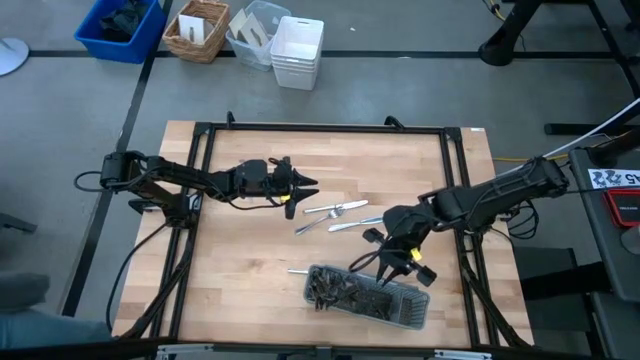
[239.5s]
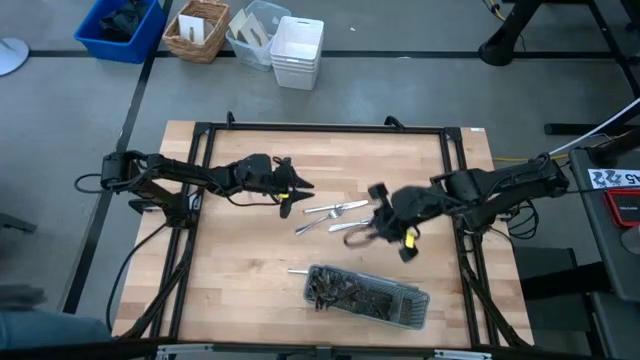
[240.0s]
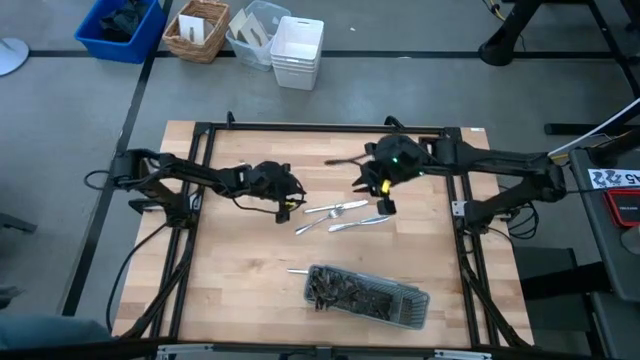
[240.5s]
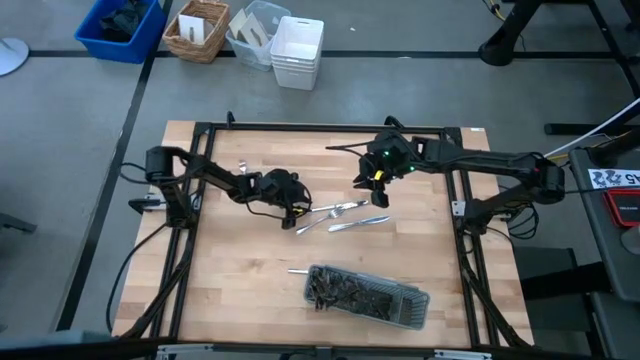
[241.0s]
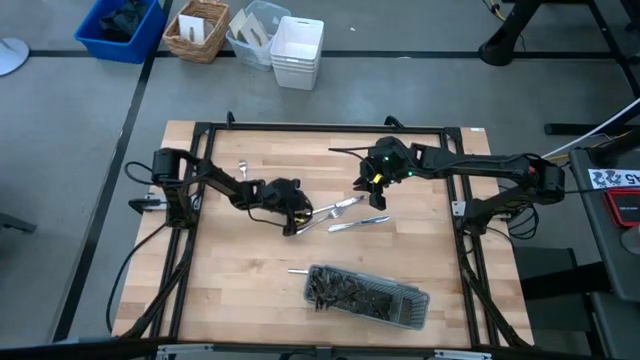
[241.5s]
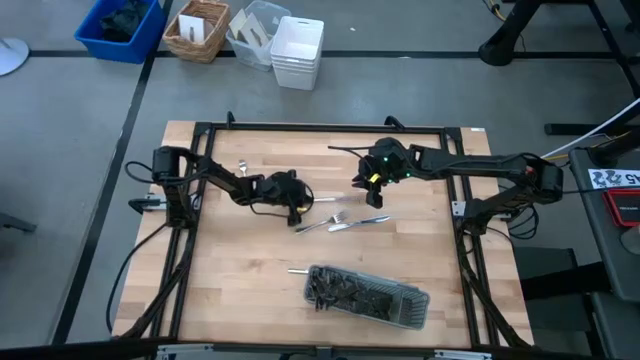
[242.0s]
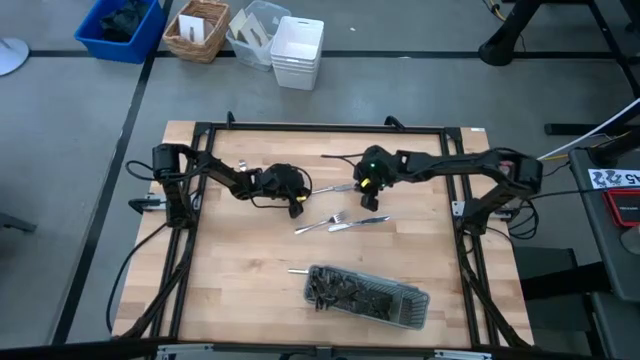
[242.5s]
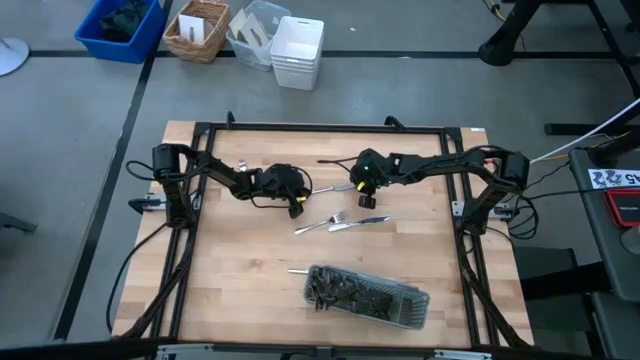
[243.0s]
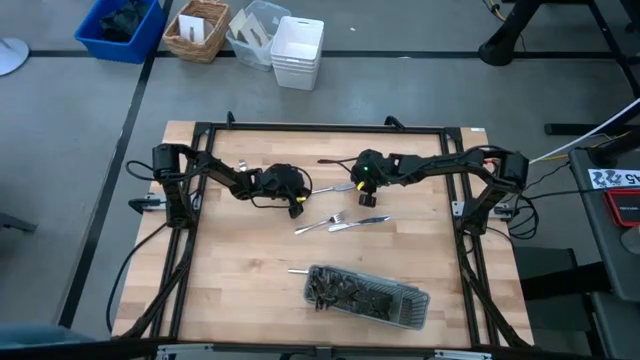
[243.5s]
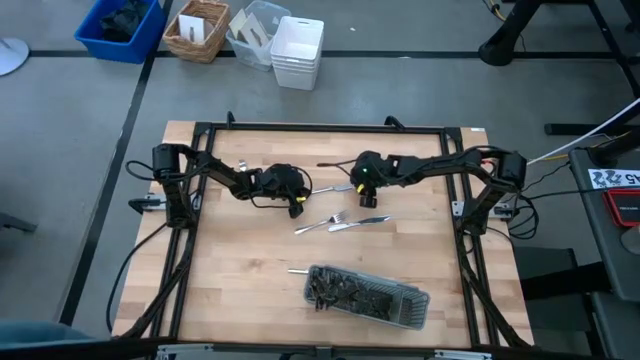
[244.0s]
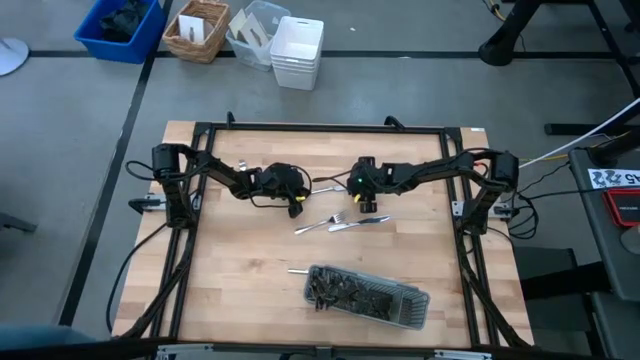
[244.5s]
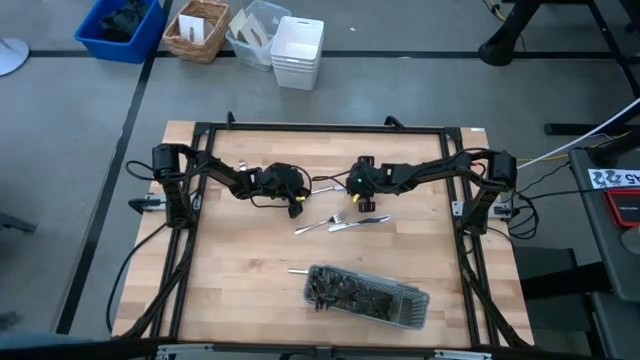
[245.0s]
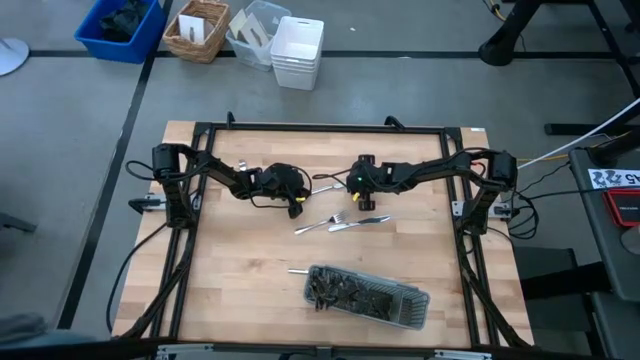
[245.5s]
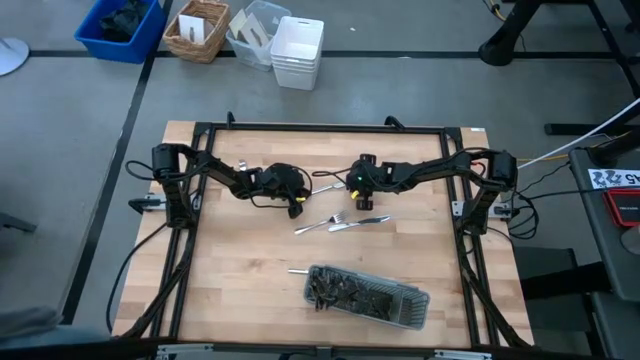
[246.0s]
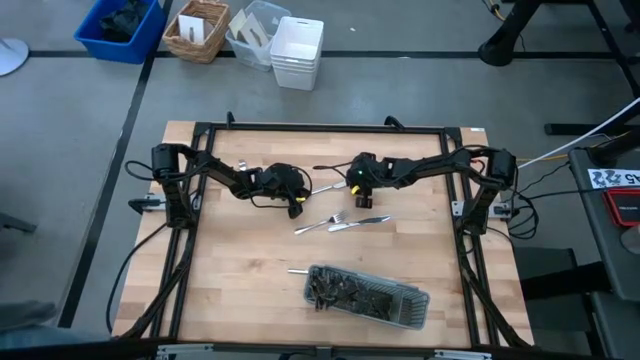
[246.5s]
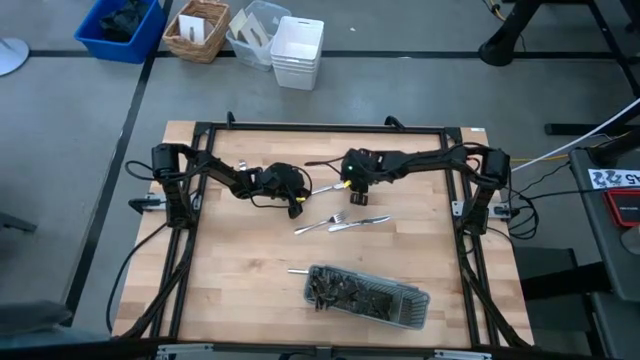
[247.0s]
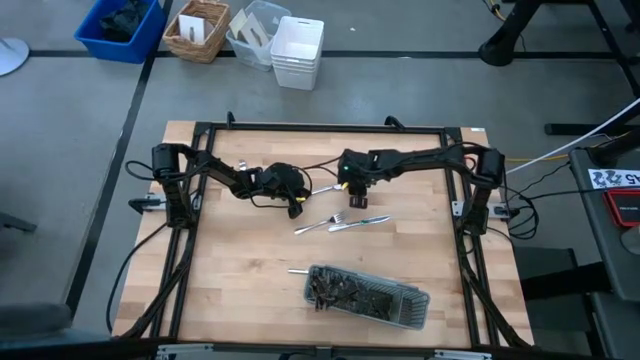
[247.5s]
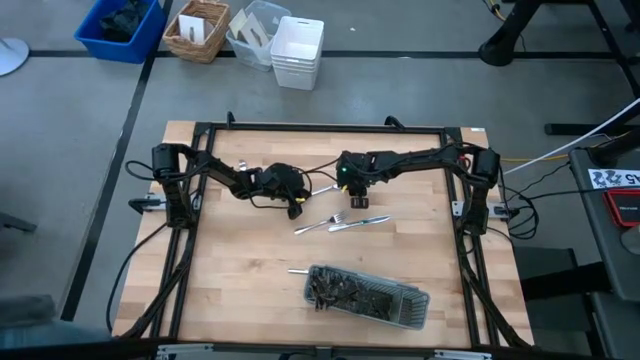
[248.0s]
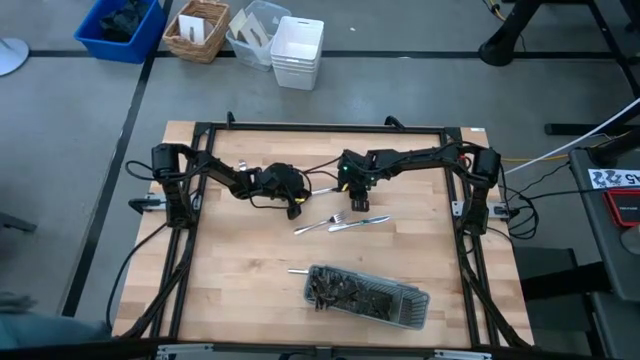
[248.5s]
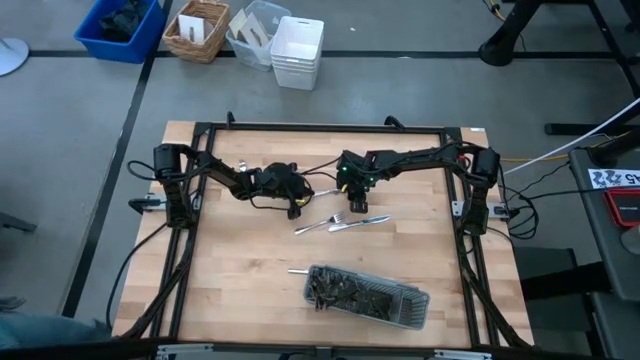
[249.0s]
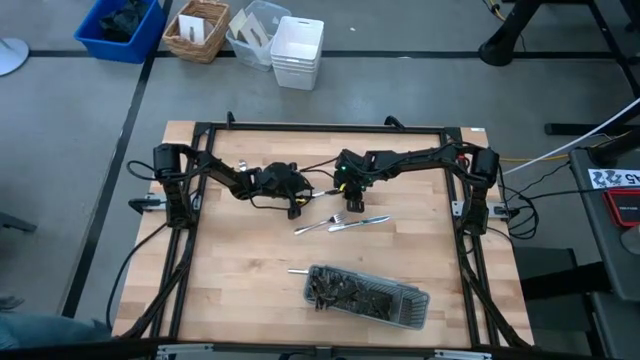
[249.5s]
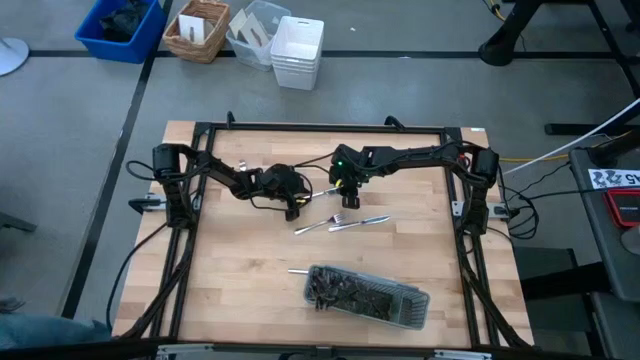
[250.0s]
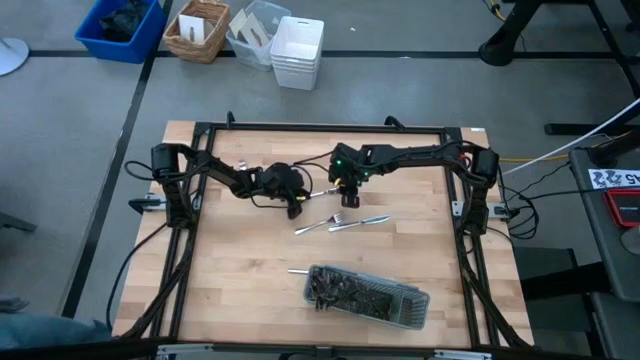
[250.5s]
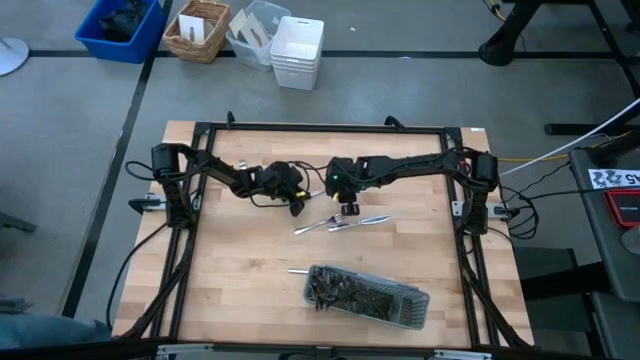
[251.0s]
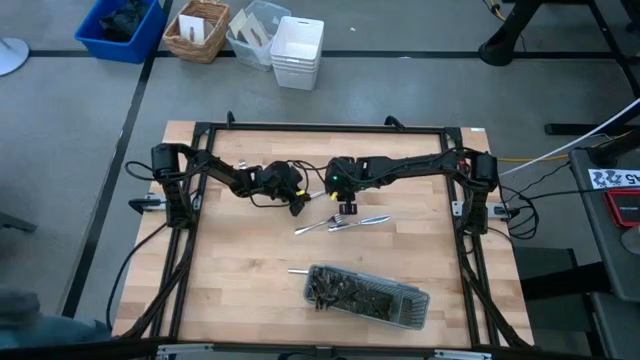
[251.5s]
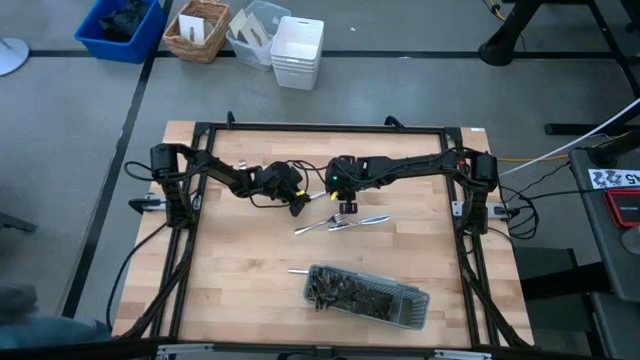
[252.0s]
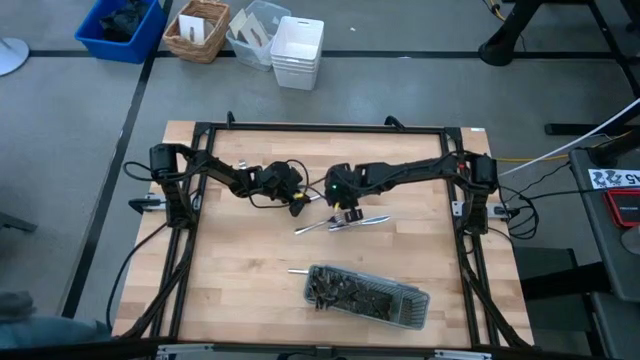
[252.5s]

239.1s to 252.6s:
Task: Sort silverware
Put the knife into the gray silverware rack

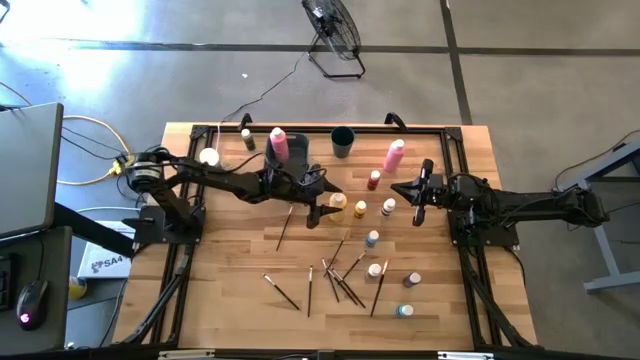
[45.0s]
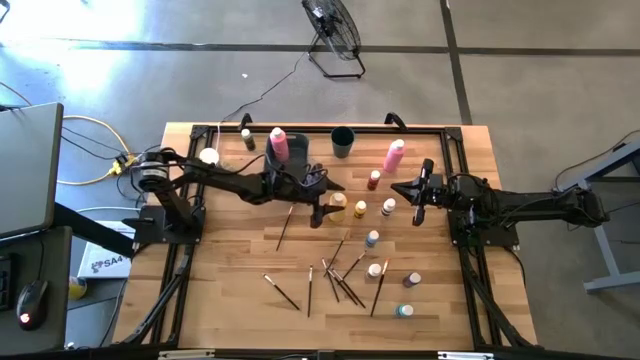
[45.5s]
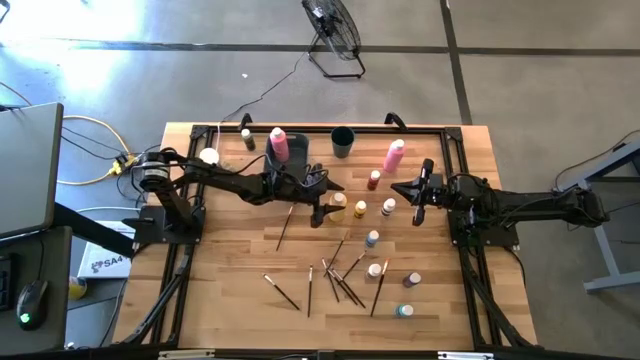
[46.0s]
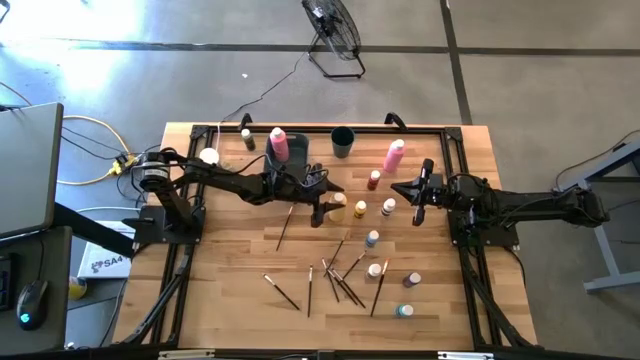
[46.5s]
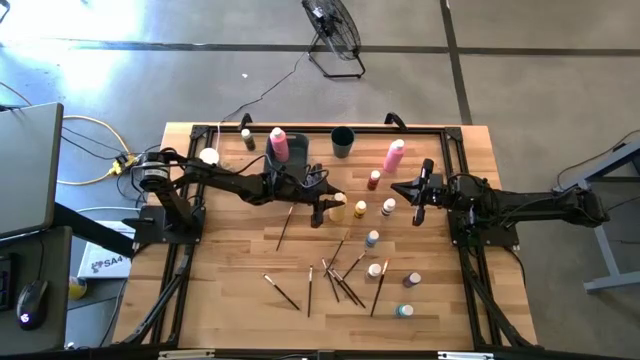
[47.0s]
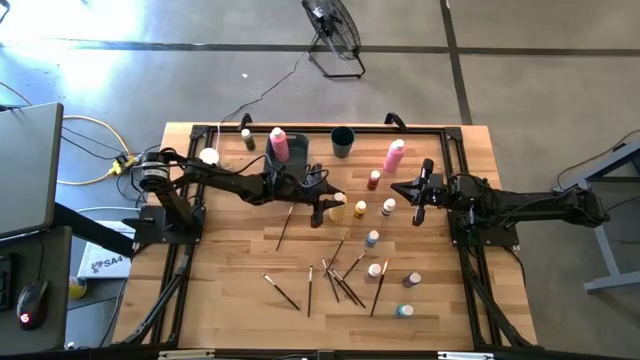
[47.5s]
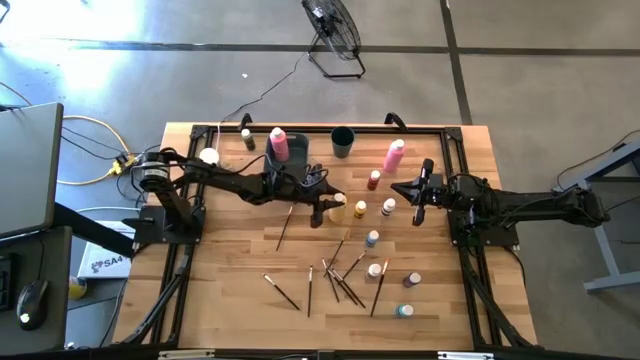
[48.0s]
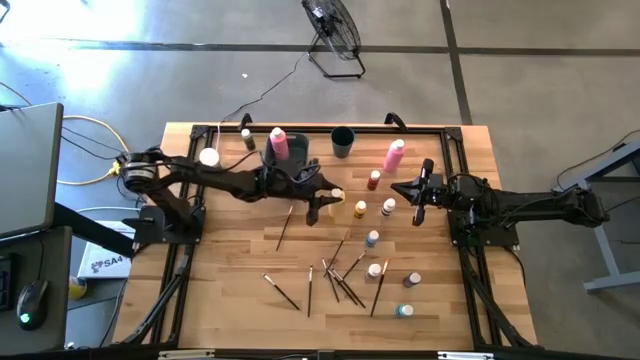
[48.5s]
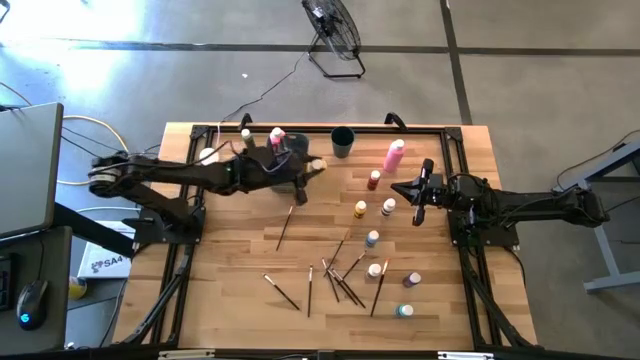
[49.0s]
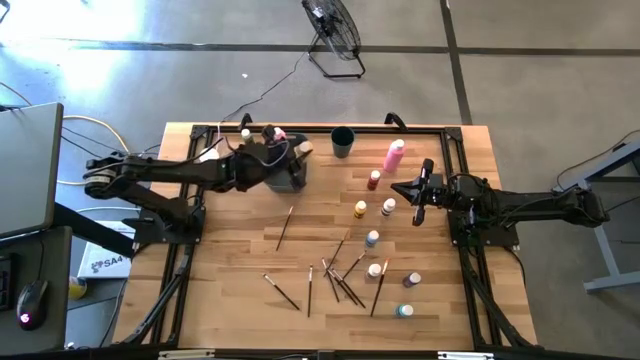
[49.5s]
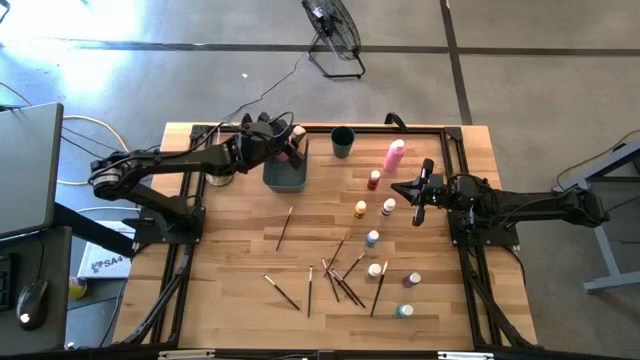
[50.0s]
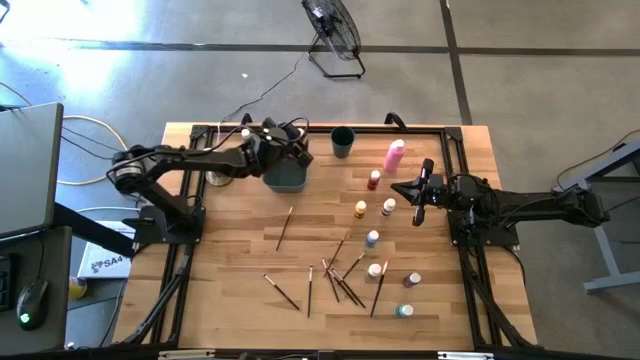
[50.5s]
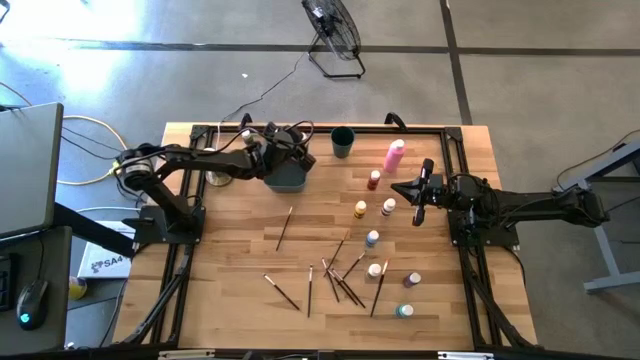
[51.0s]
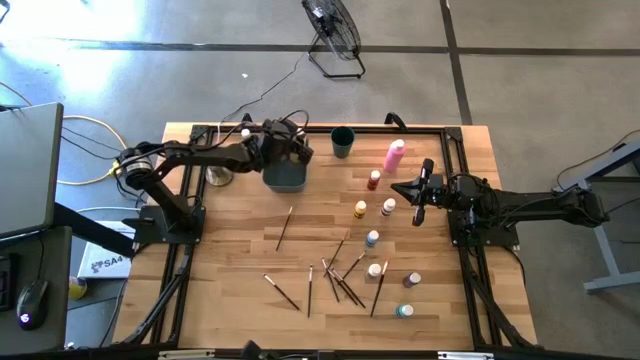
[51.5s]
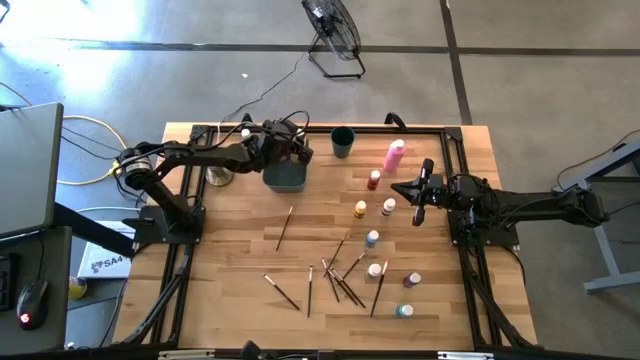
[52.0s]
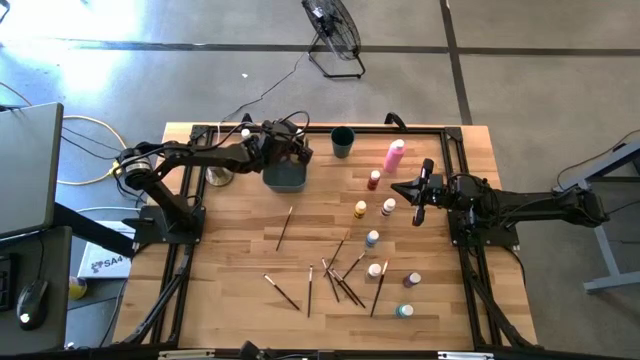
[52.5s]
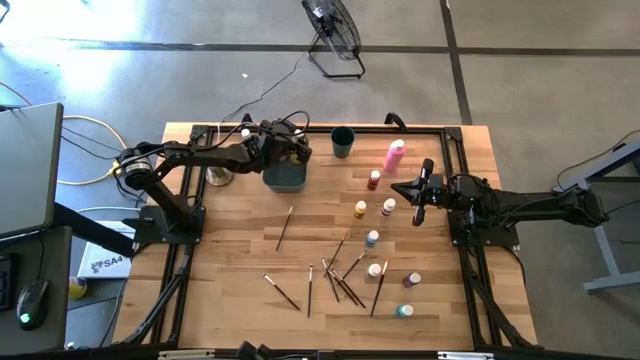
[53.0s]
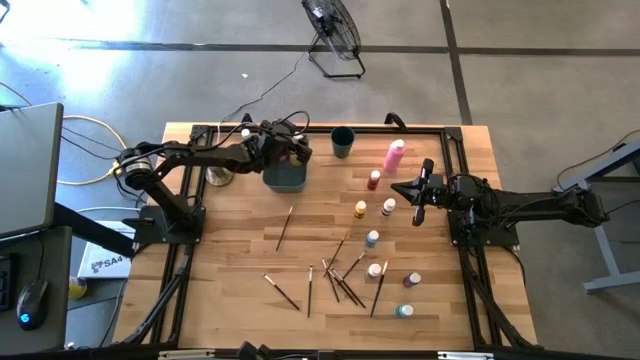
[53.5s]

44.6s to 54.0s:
Task: Pick & Place Paint Supplies
Put the large yellow paint bottle into the green bin
